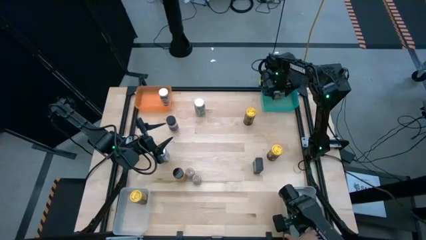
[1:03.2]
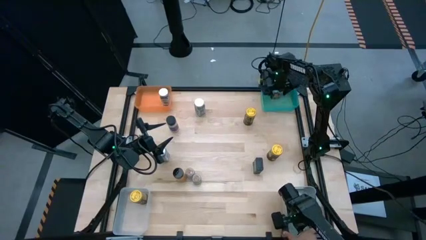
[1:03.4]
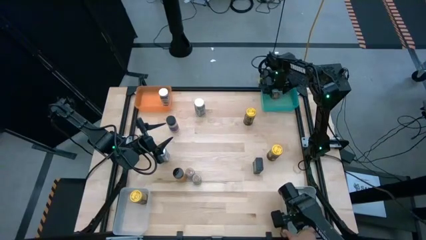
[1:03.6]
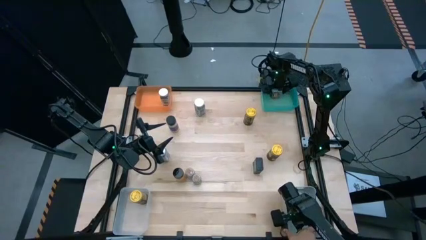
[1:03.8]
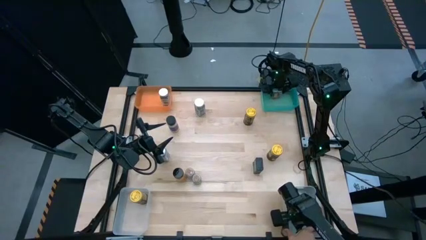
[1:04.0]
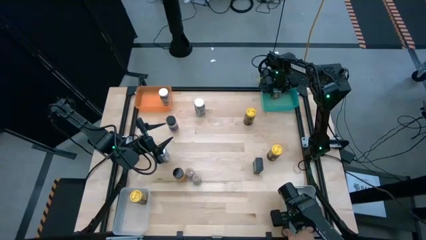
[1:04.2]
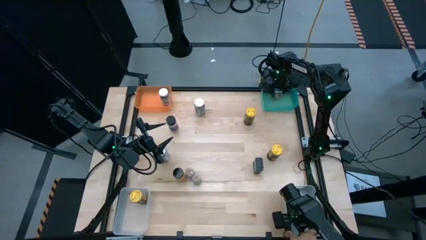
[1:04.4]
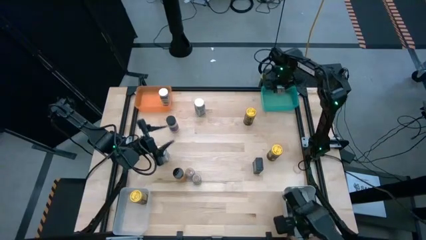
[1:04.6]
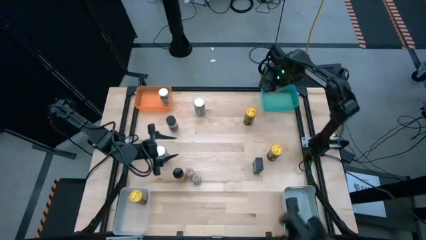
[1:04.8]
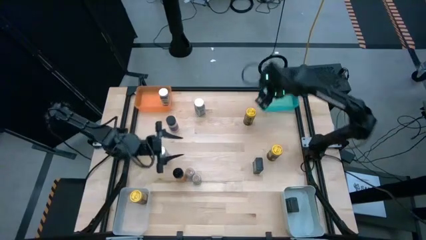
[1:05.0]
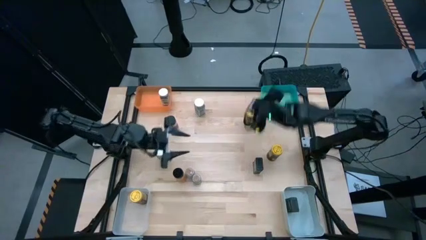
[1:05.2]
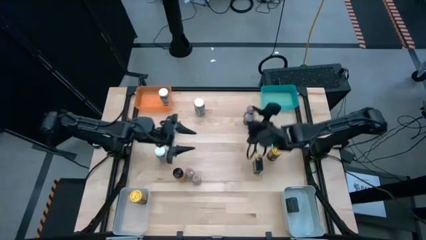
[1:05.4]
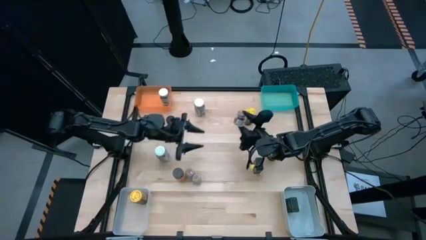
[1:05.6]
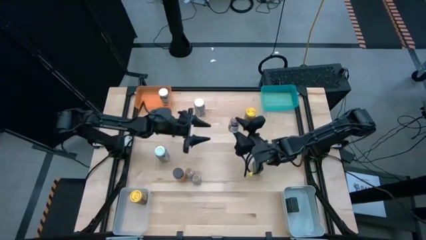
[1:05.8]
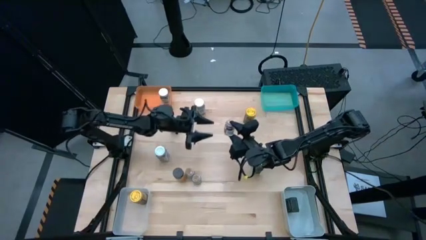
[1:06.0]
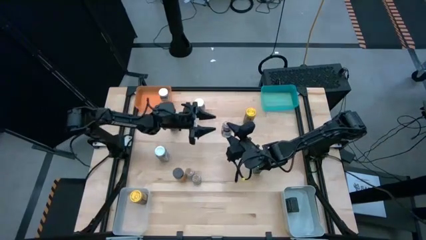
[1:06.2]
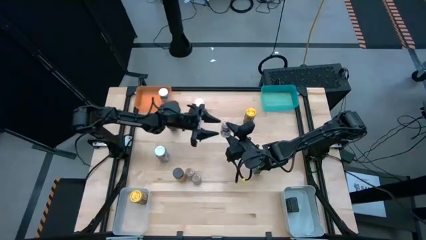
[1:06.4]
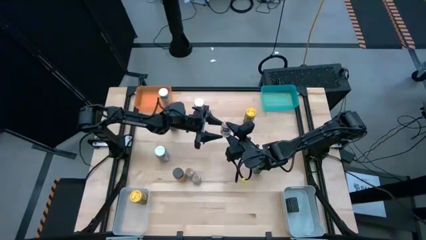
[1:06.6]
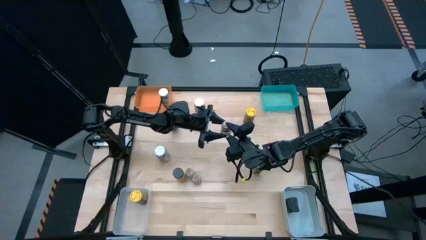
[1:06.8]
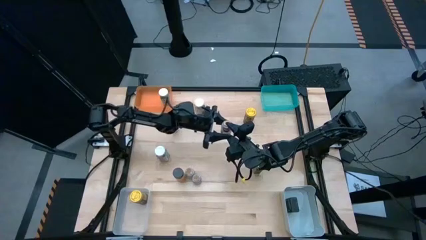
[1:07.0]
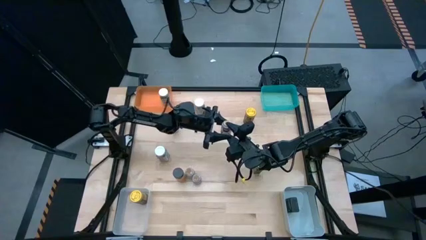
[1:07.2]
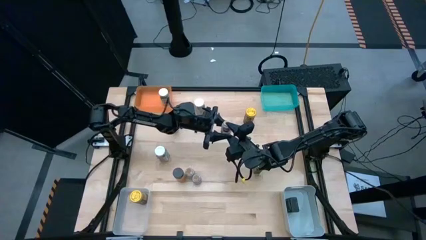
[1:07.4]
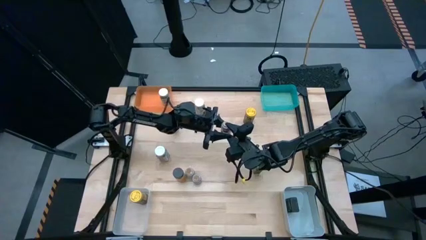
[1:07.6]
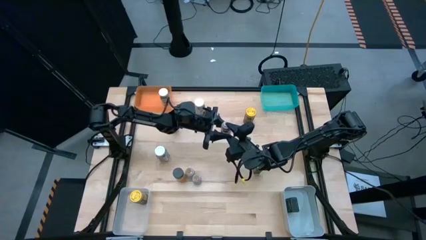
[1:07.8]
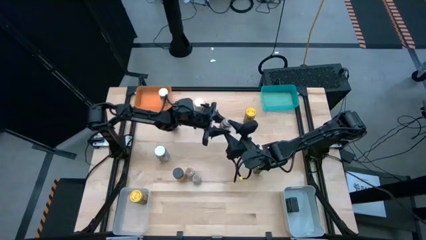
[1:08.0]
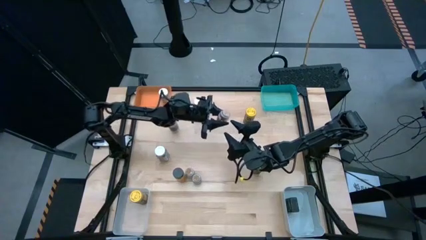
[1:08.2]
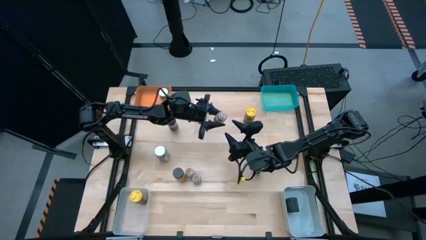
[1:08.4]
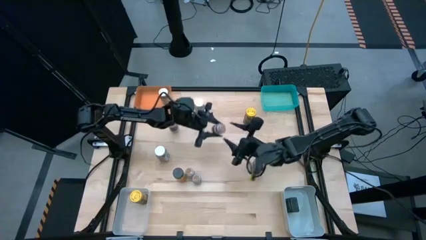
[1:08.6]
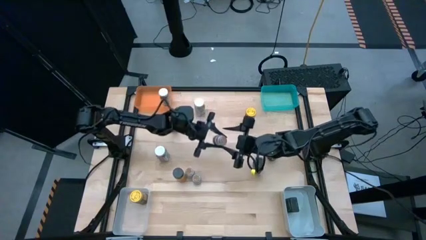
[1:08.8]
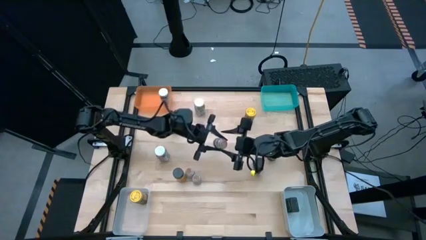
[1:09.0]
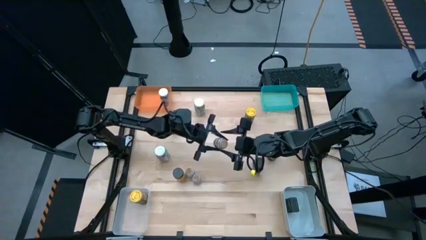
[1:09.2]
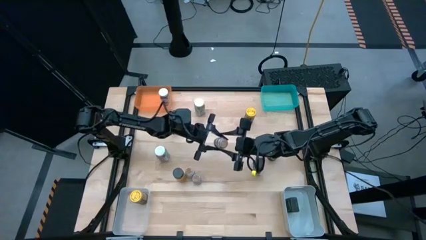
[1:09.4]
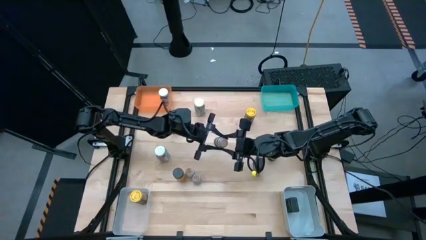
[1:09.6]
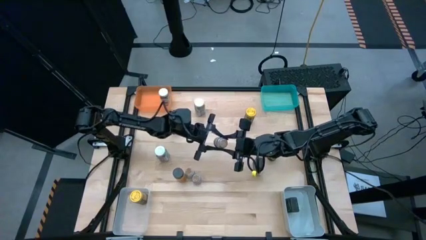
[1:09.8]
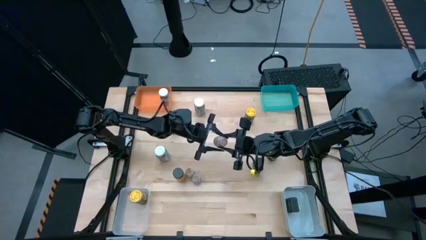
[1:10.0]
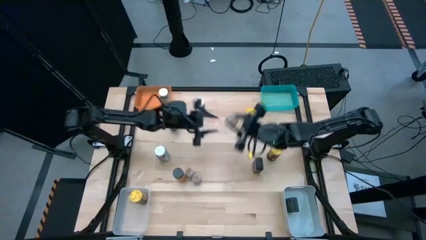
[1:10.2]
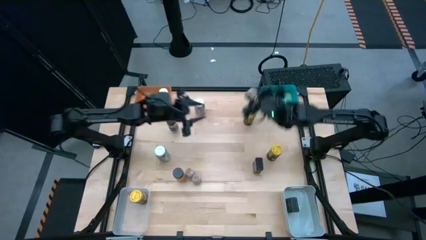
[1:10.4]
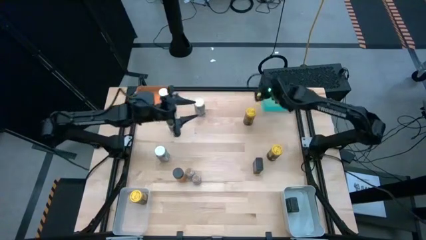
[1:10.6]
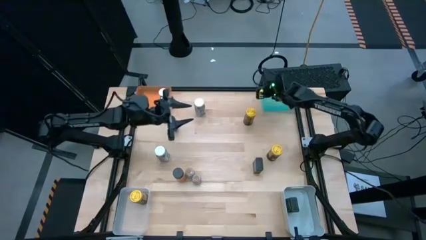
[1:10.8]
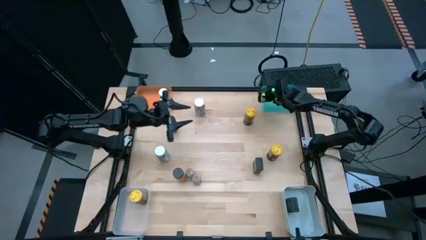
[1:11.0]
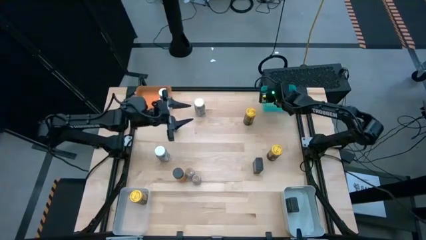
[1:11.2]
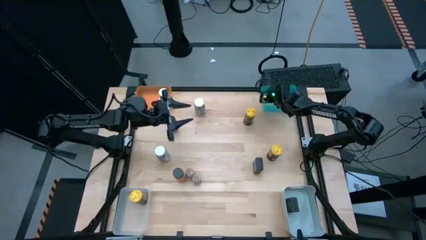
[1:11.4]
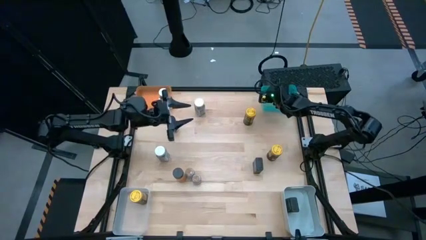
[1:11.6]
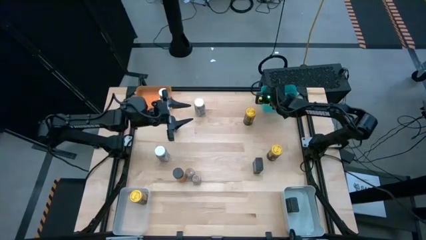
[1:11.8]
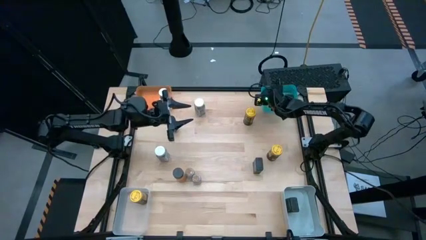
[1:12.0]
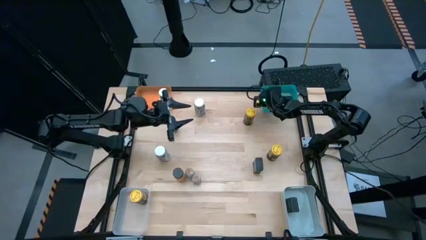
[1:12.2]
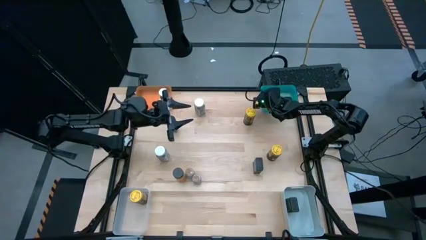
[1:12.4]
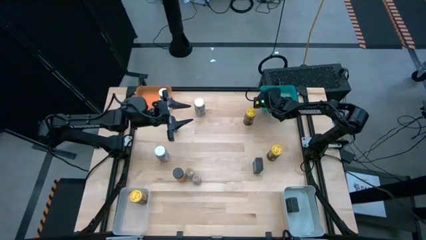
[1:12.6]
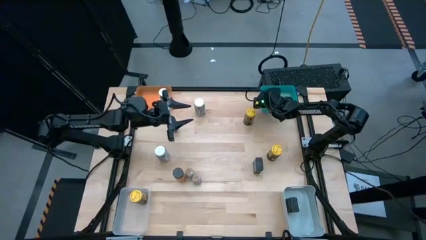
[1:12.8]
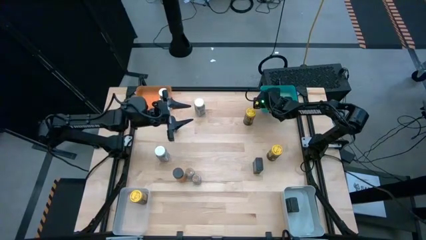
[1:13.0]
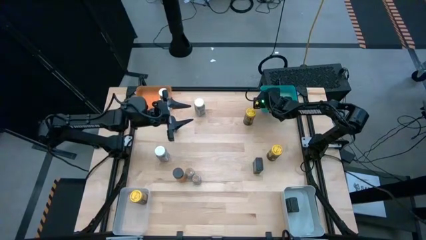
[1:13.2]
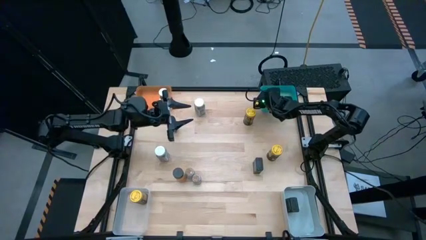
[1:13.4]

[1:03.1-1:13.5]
Task: Sort spices by type
Put the top brown seasoning bottle into the blue bin

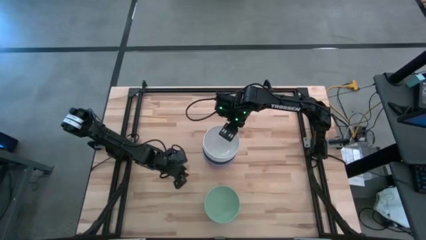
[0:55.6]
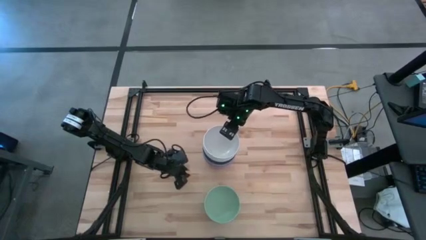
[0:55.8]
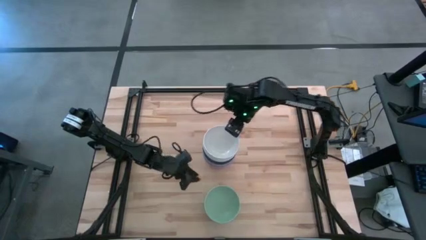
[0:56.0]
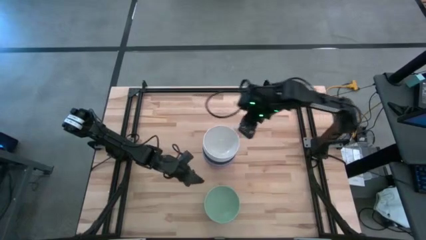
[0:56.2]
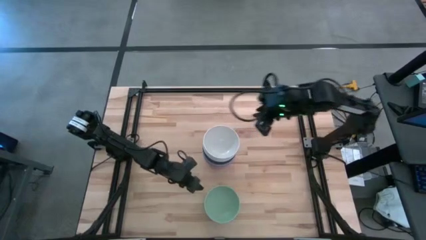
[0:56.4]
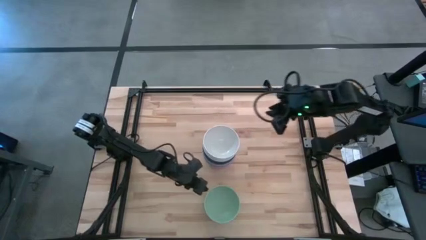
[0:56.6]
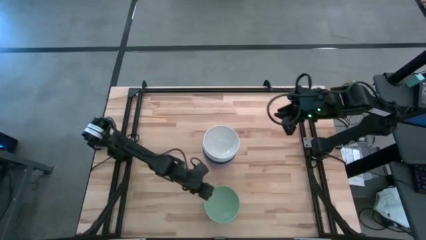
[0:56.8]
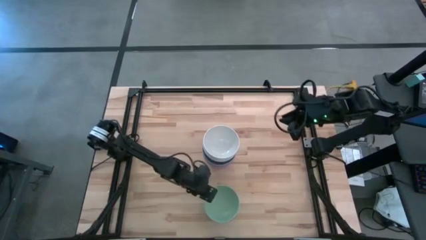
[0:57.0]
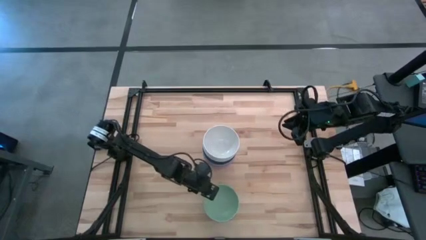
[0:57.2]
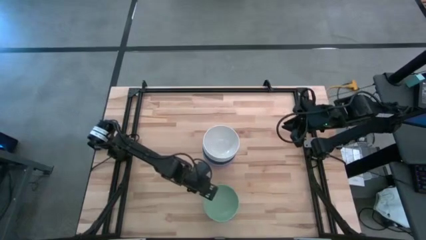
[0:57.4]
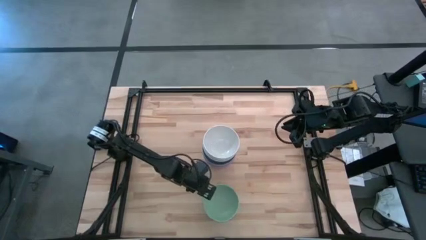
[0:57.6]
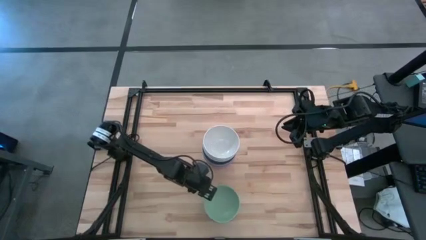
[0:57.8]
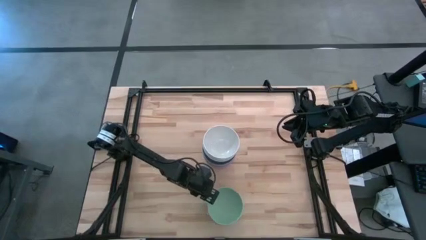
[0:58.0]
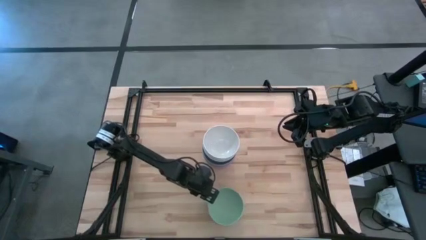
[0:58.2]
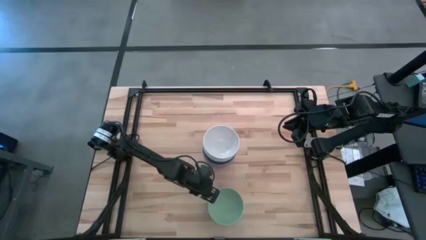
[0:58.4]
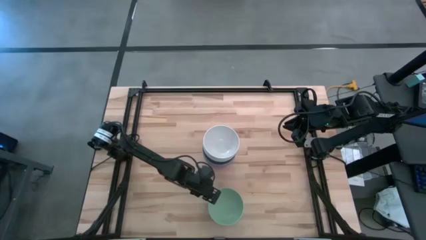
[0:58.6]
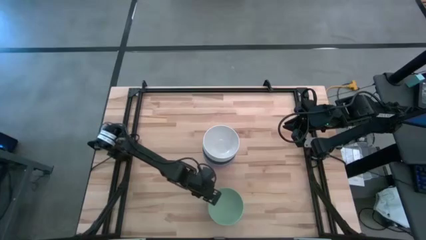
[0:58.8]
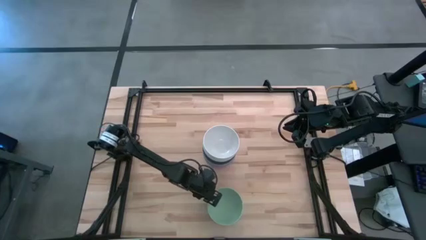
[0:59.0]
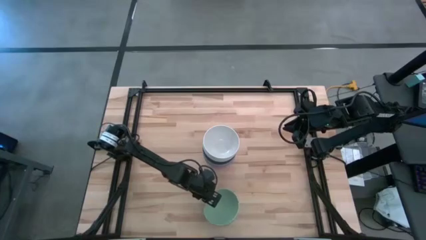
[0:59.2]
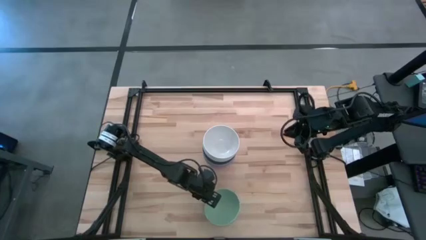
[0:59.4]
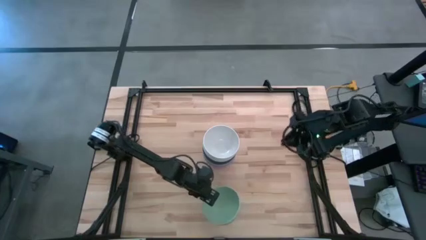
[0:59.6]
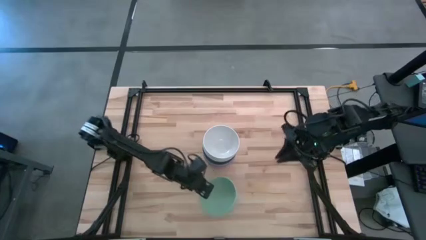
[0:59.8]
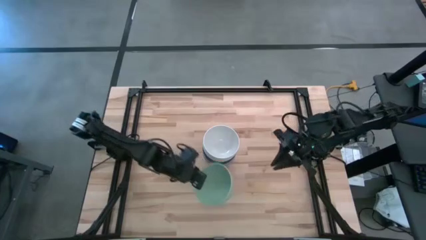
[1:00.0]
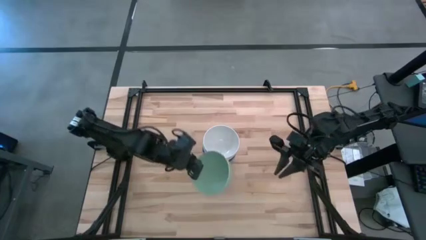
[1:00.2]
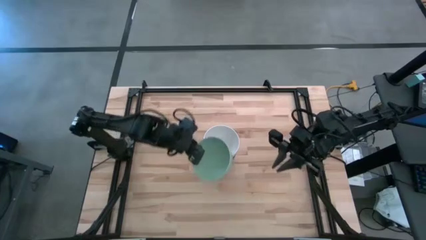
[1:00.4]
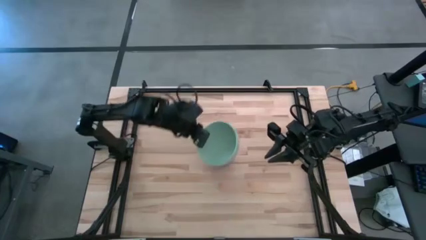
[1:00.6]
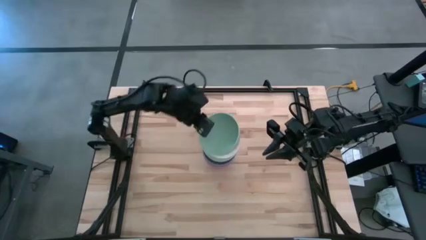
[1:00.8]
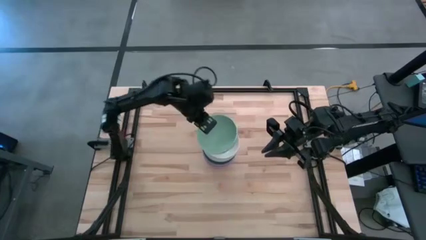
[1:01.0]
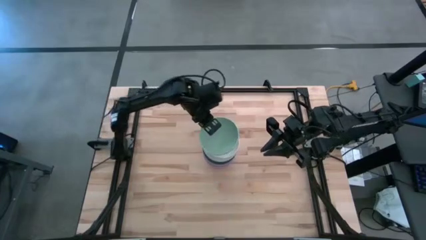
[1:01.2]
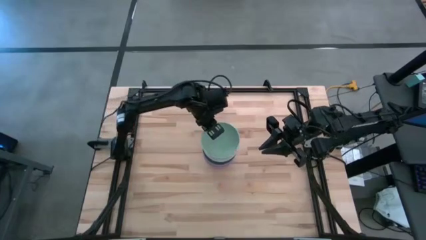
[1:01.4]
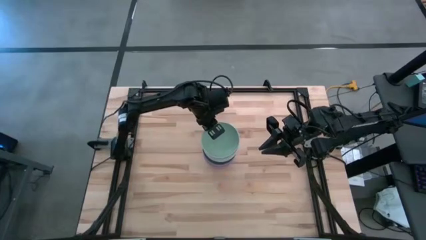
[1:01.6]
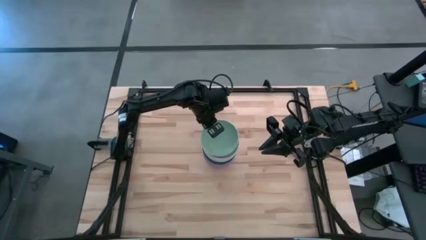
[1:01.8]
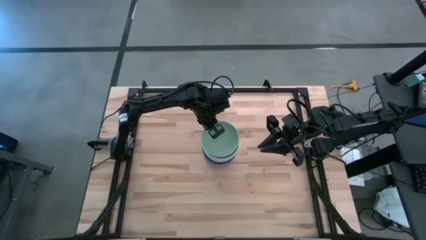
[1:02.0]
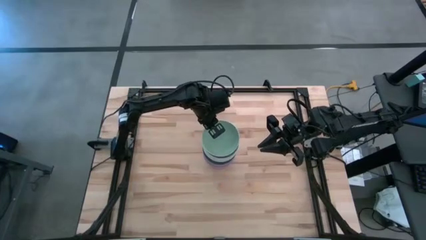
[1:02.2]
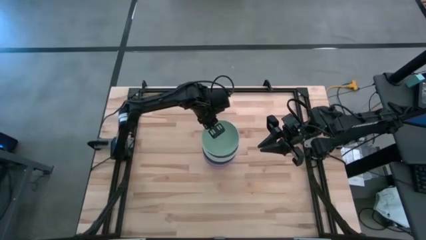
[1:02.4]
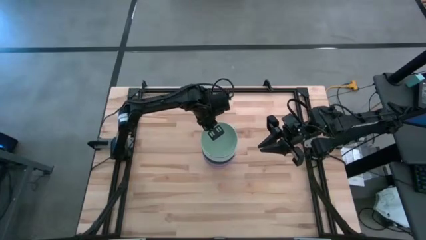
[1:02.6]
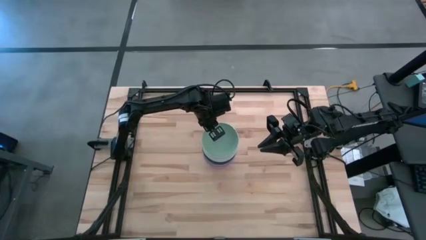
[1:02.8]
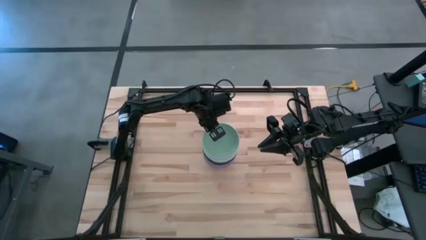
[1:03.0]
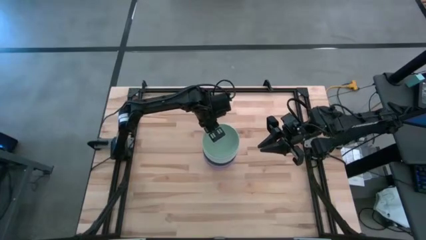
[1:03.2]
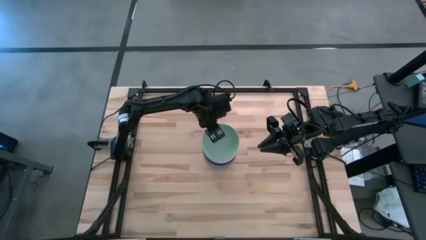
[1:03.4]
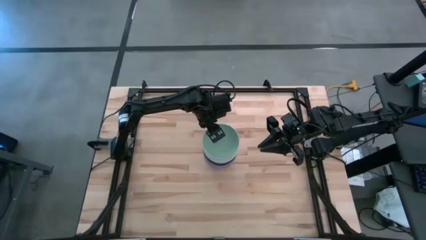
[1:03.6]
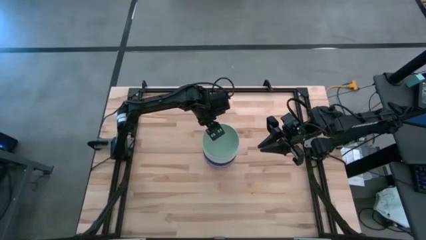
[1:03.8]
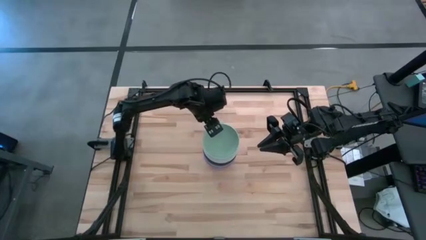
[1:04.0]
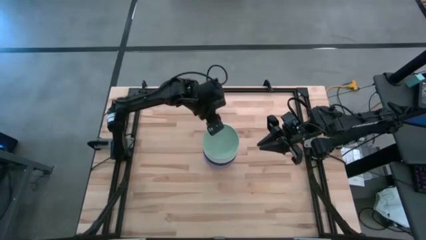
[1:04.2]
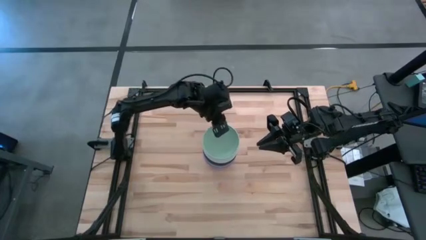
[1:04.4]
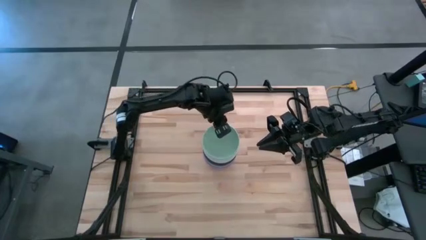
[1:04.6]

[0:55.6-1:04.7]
Task: Nest bowls inside each other
Stack the green bowl into the white bowl
